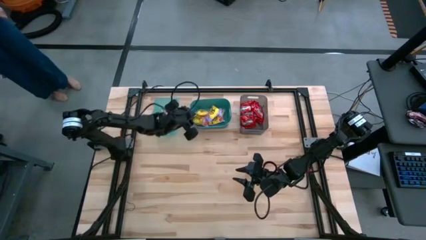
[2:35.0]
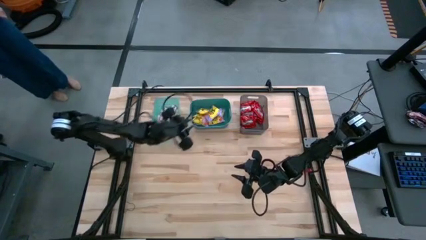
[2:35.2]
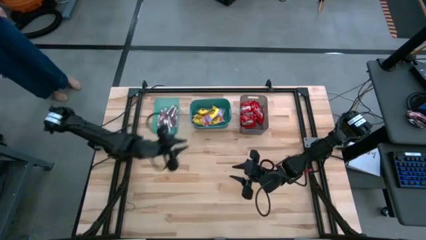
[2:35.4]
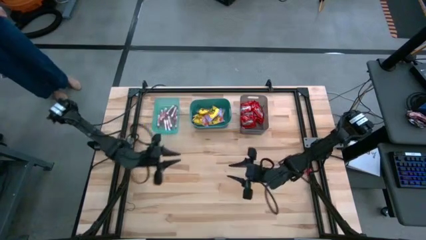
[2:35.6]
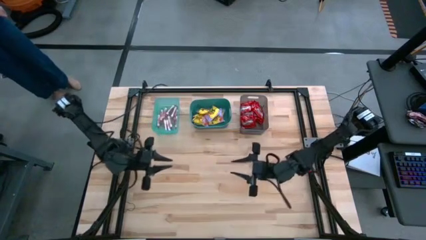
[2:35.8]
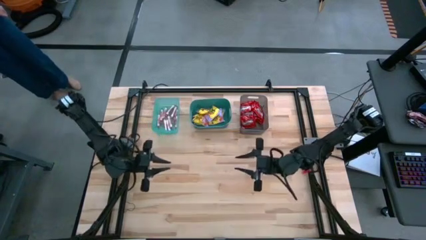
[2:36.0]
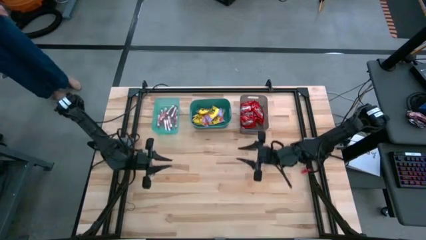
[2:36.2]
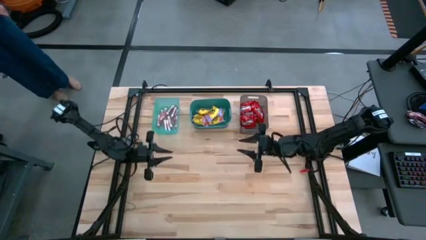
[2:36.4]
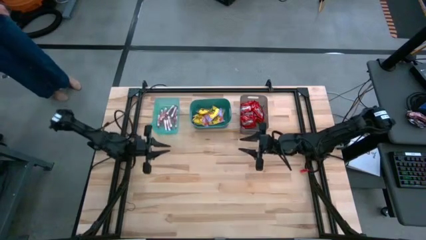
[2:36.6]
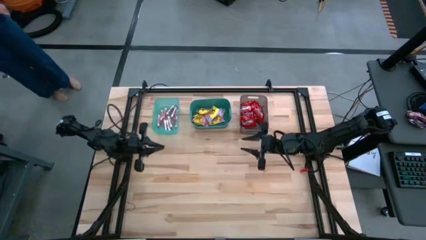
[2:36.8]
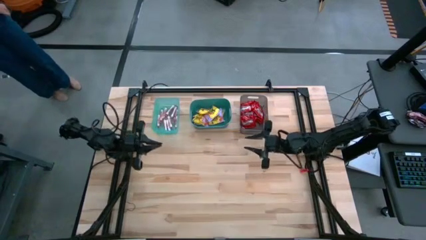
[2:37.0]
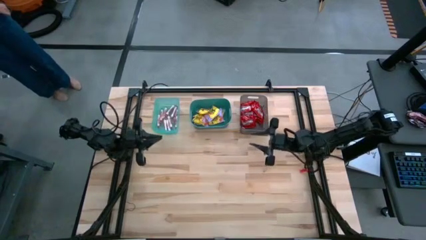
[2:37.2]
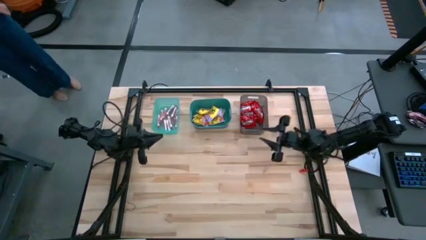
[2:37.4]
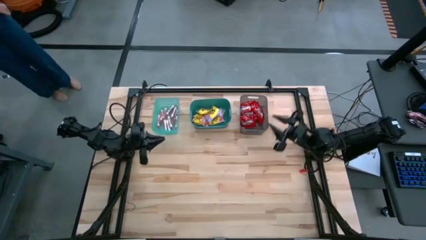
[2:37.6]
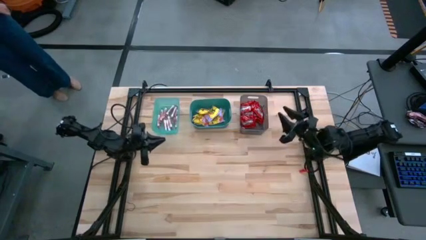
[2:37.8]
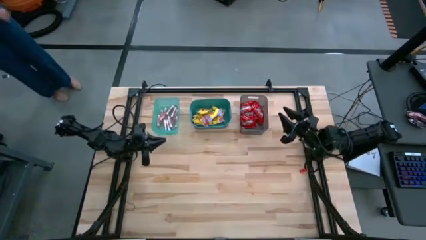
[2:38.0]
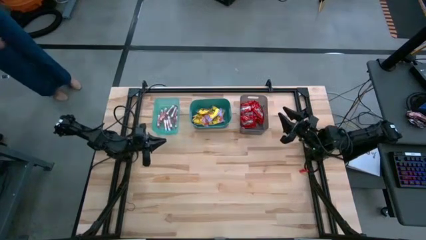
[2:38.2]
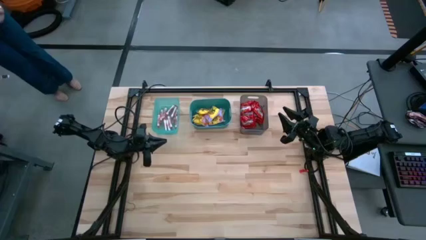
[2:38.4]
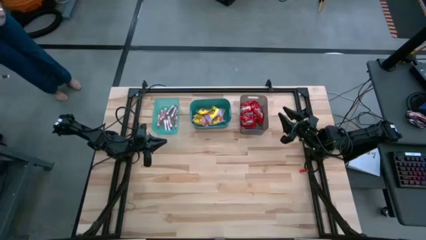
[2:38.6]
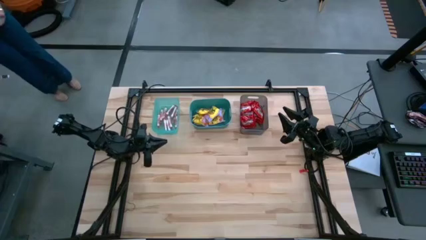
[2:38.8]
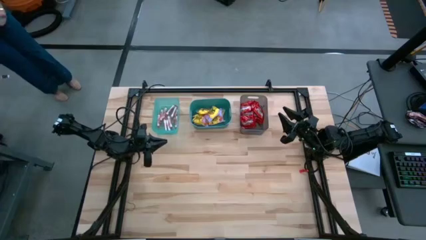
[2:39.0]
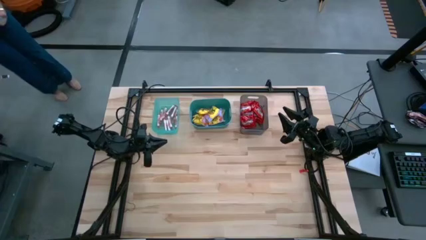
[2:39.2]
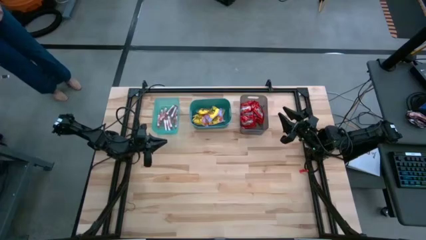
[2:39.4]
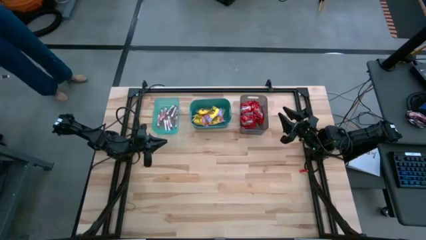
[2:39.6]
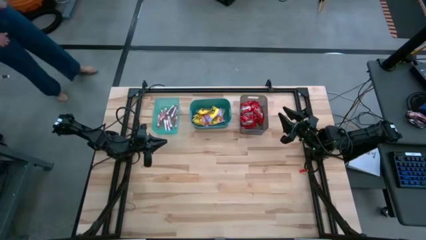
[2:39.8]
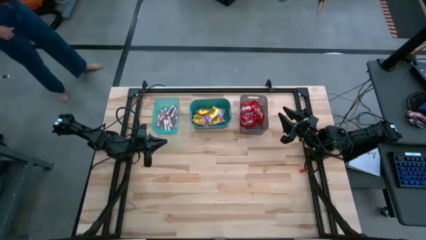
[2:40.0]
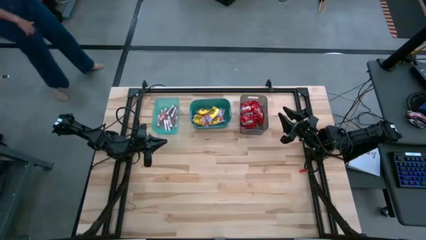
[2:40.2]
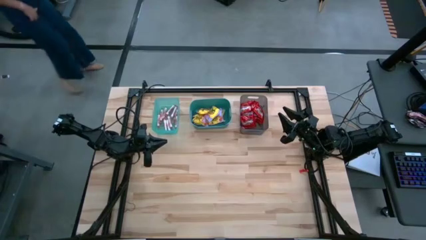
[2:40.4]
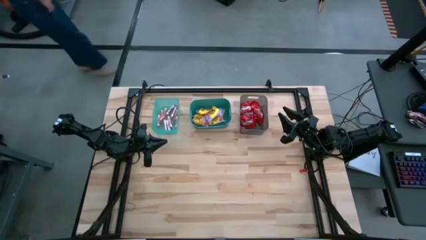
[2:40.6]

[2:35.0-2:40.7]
Task: Sort candy
Return to Home Position

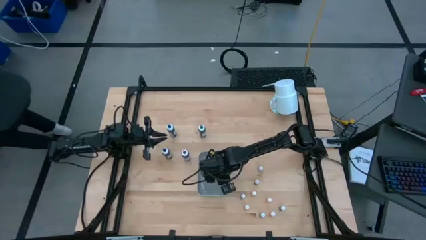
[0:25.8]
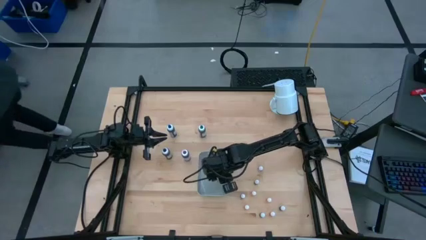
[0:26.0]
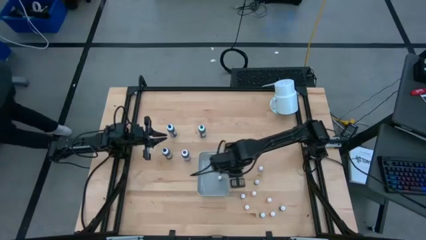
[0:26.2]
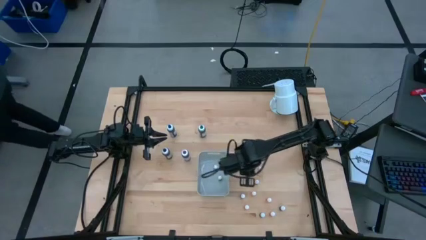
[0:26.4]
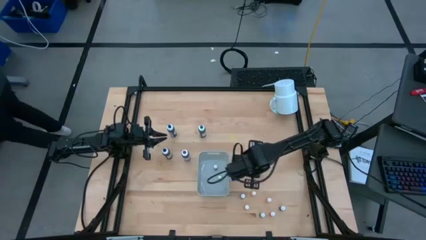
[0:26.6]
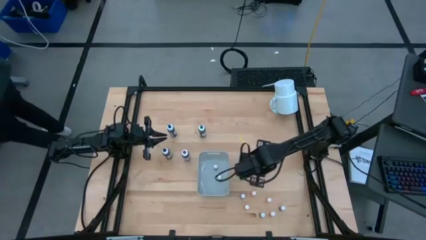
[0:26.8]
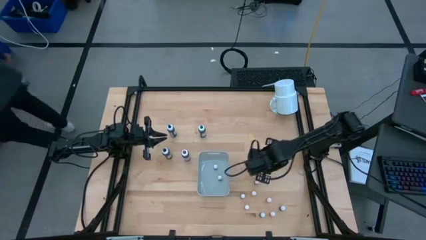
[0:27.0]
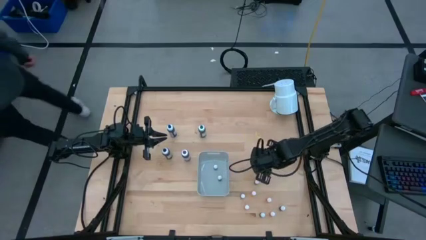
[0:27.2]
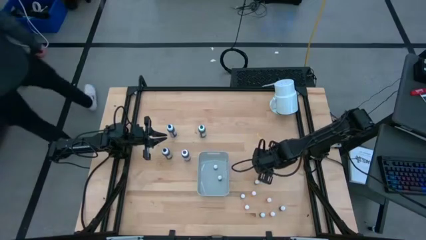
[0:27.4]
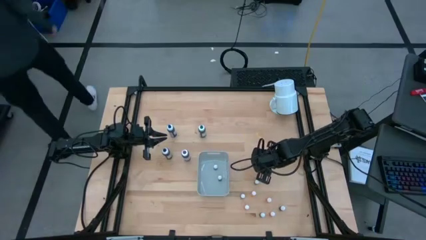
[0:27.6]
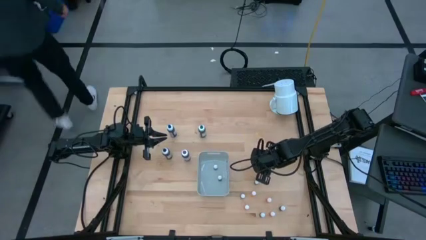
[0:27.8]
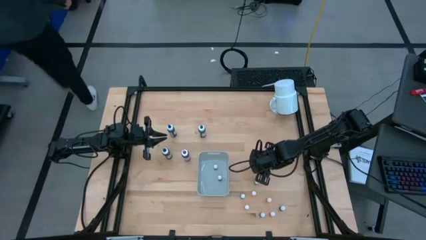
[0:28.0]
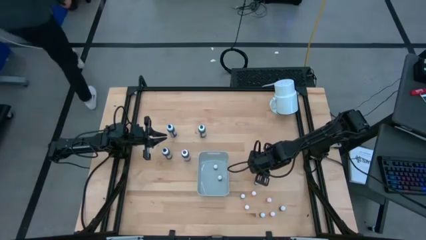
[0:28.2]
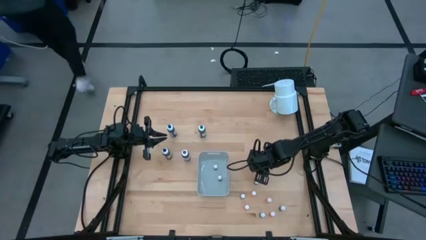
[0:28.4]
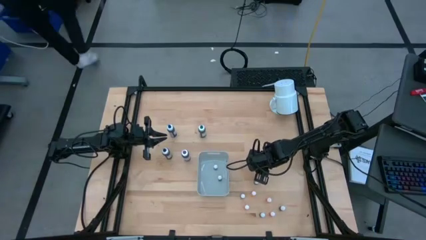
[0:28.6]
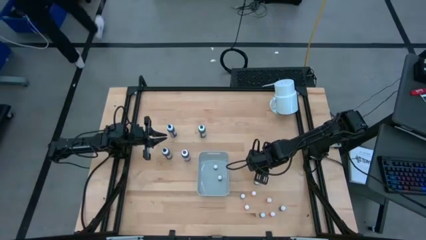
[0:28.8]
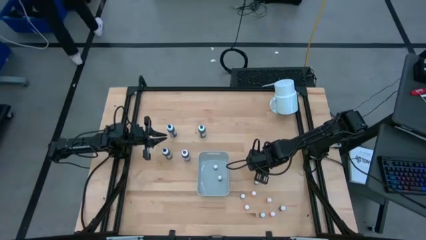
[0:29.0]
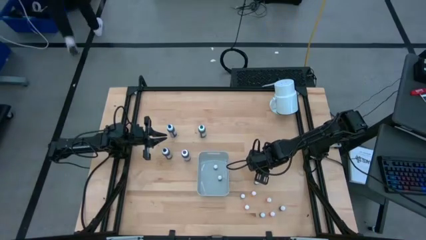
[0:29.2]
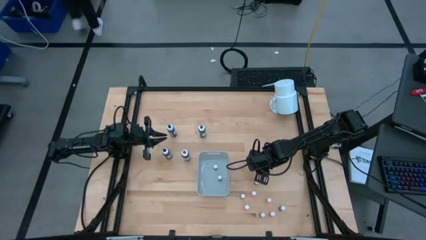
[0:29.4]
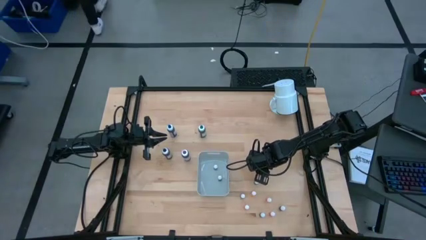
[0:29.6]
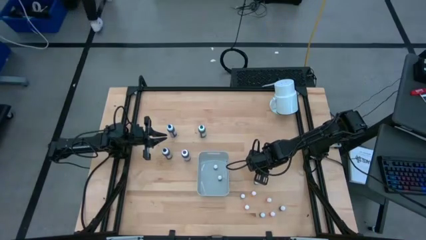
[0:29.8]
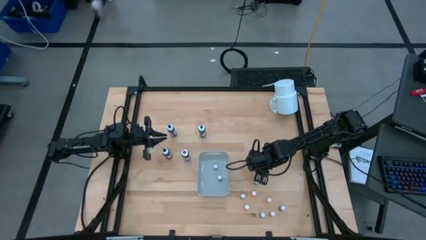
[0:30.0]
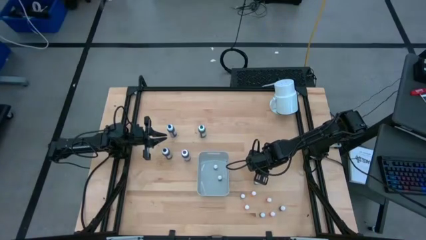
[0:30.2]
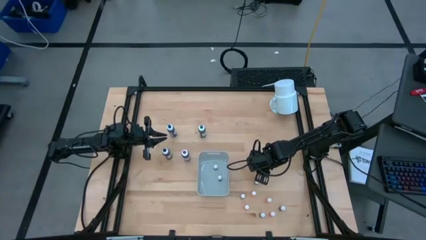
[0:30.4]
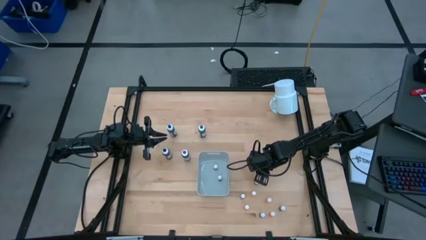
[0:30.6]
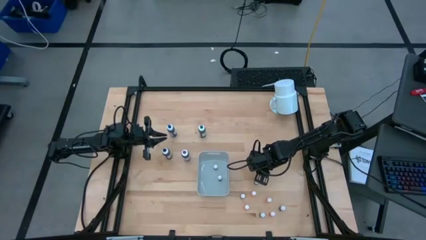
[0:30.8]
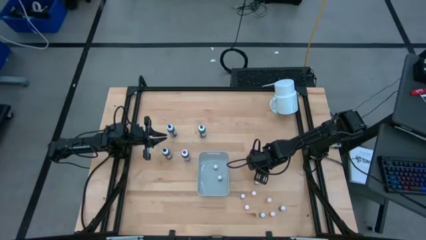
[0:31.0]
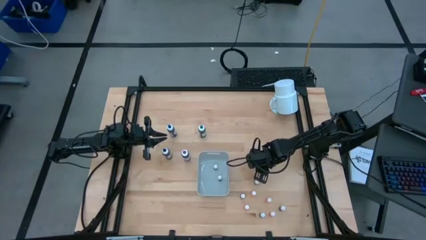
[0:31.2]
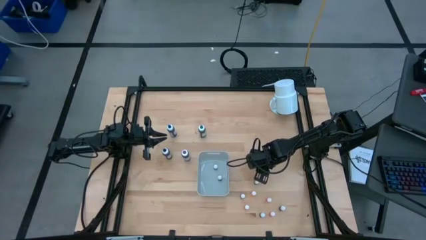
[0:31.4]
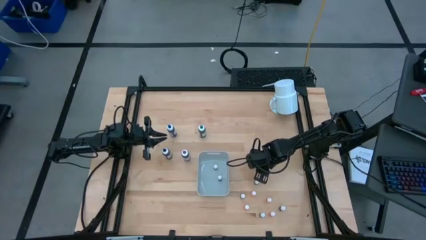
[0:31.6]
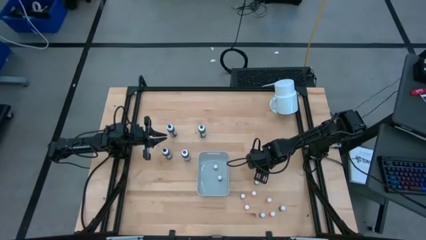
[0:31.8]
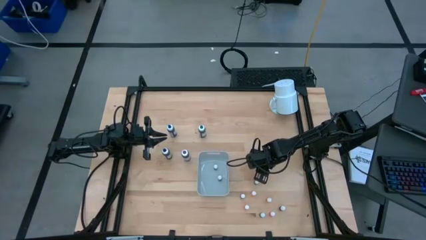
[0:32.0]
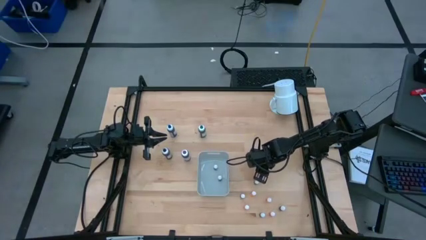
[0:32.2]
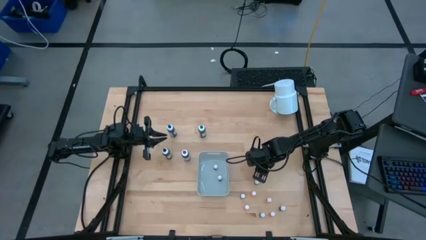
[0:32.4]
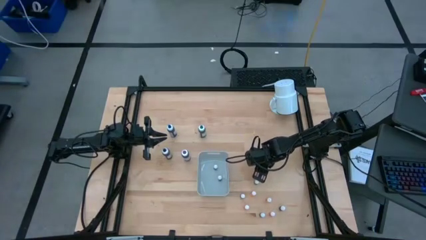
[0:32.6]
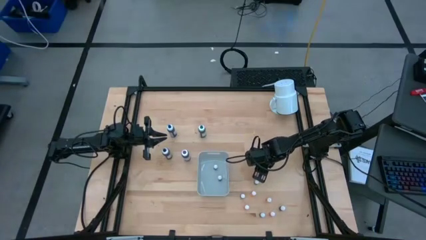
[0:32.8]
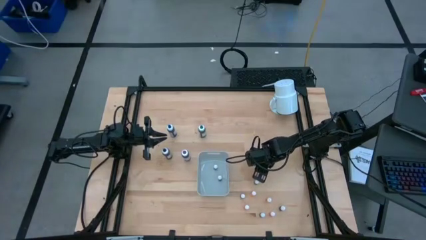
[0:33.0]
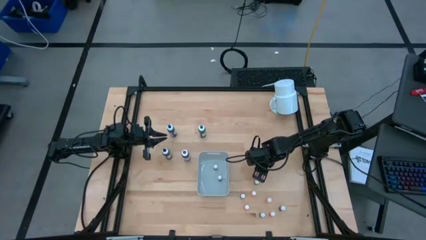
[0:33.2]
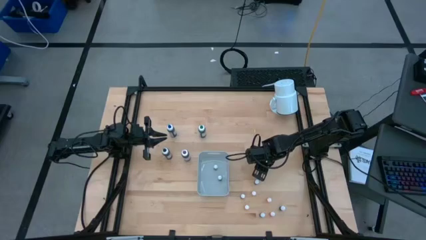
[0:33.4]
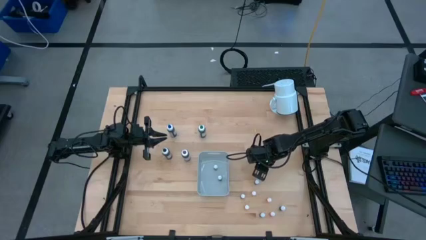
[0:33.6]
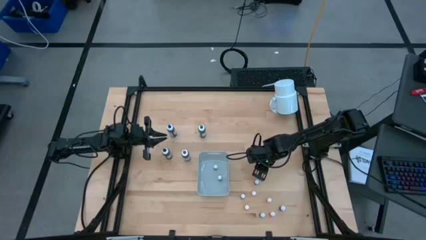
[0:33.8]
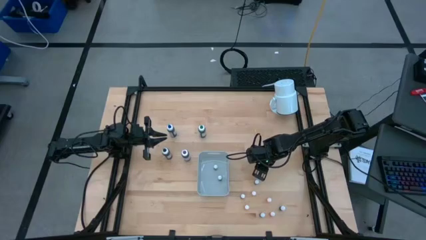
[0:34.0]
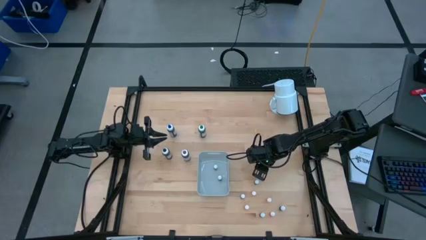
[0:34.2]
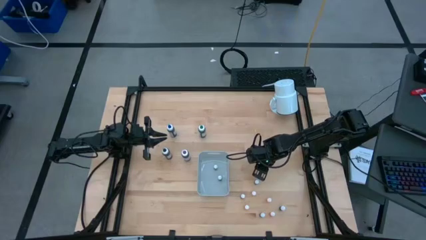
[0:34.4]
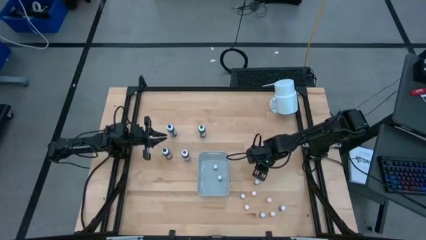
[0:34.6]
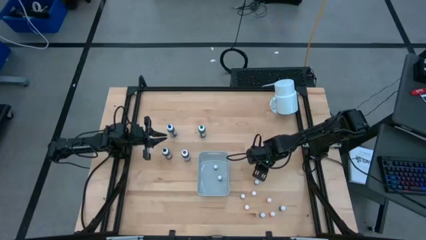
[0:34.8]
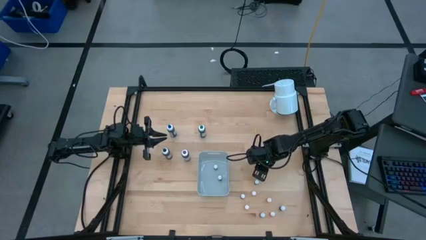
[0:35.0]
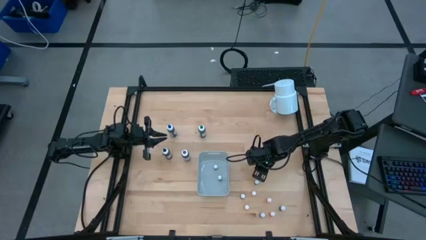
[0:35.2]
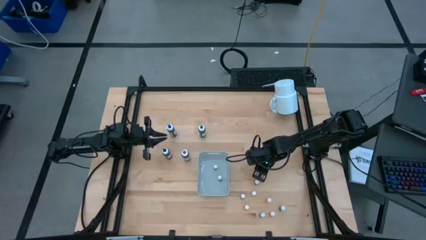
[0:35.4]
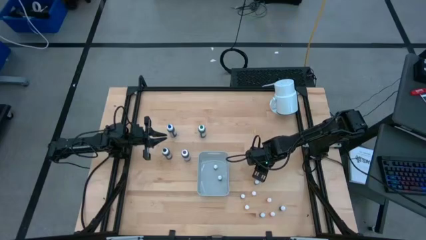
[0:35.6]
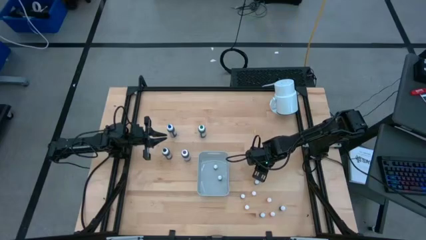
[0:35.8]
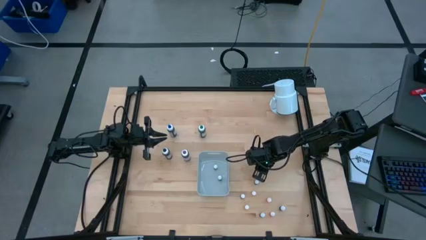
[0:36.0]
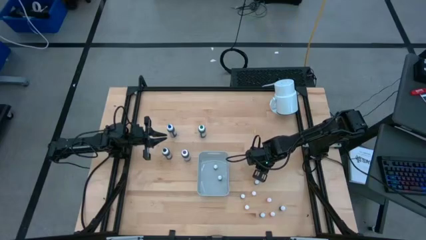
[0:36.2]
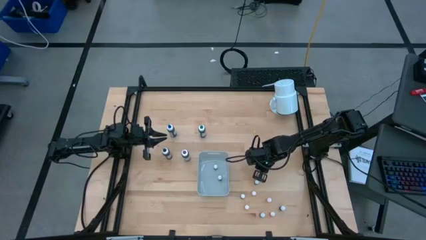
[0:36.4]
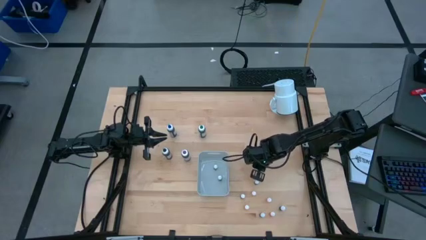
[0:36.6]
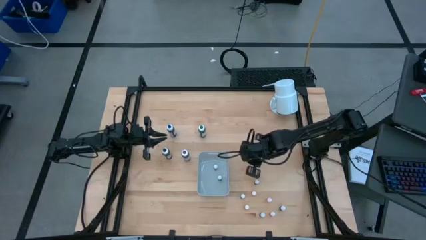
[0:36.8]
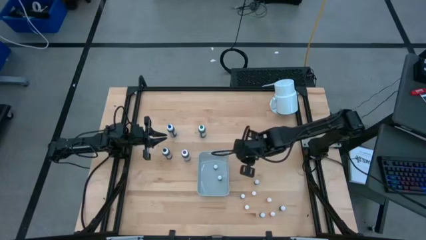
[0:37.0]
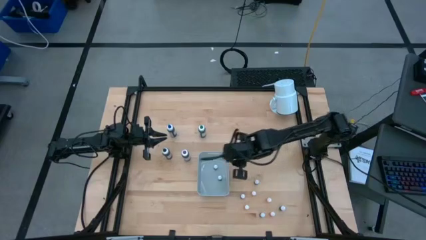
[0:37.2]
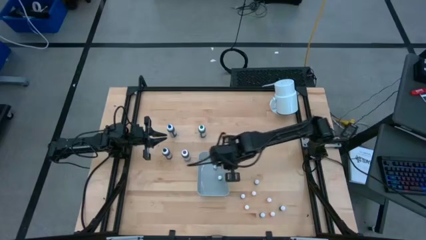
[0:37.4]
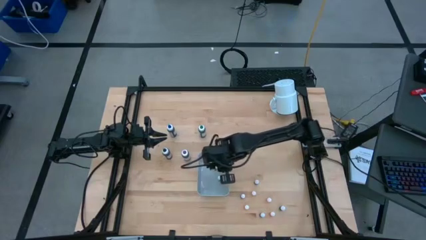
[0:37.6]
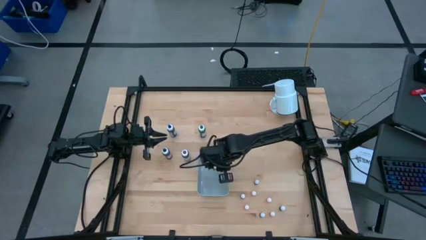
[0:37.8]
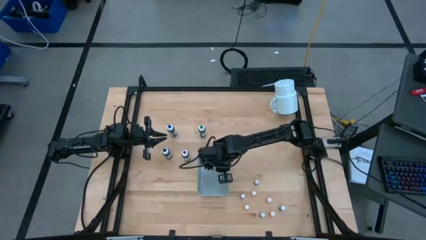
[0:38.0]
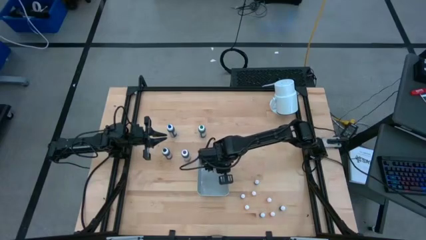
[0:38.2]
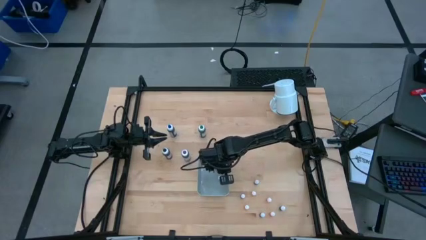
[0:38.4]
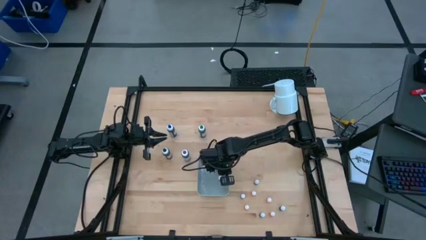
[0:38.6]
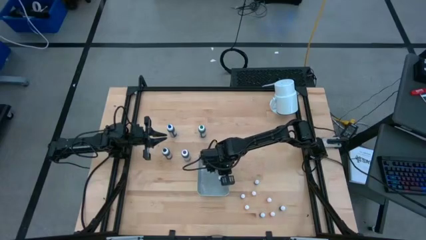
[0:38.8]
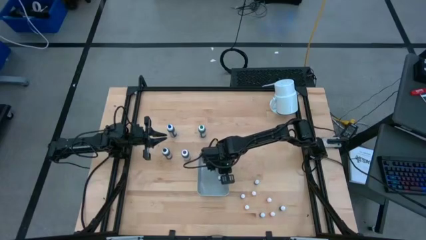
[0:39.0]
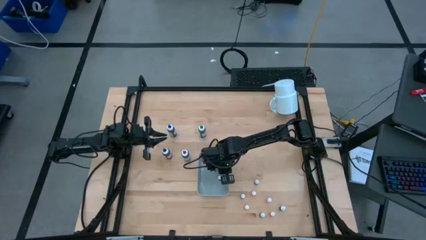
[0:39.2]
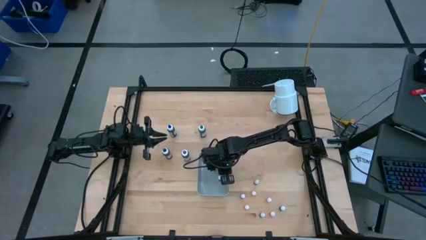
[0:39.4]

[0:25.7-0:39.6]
Task: Pick & Place food coloring
Put the small orange food coloring bottle into the white bin
